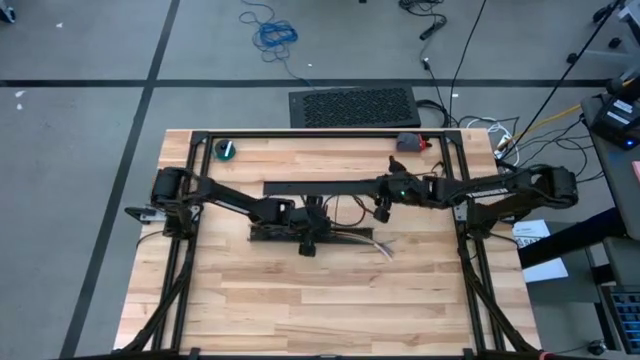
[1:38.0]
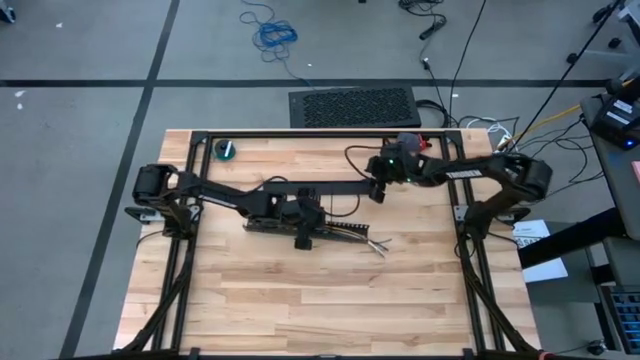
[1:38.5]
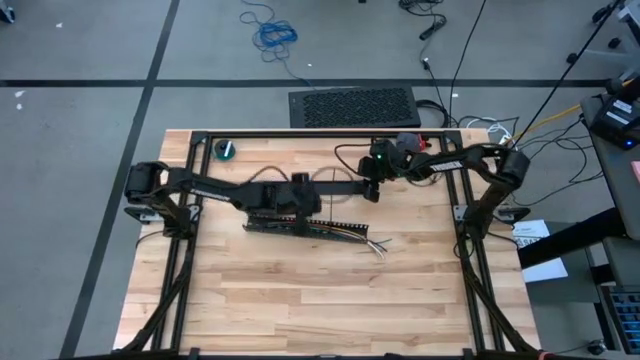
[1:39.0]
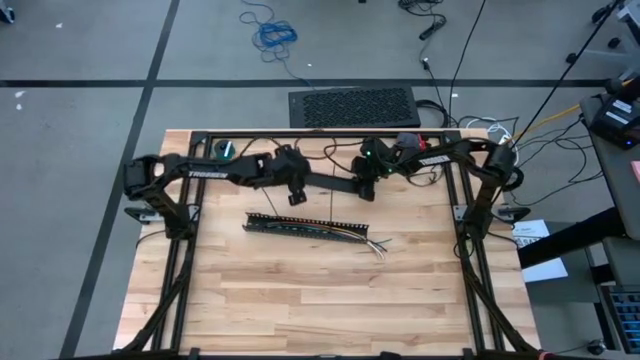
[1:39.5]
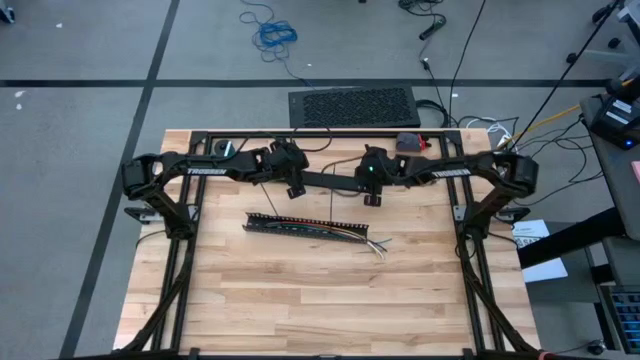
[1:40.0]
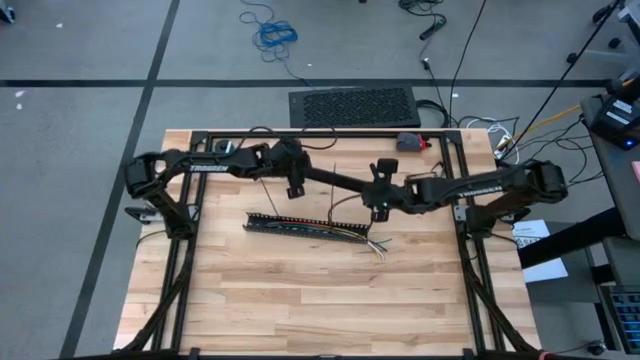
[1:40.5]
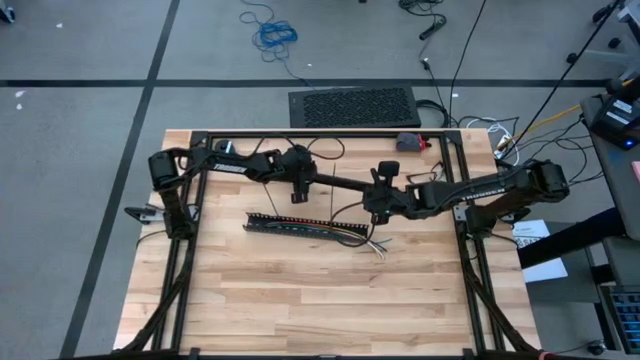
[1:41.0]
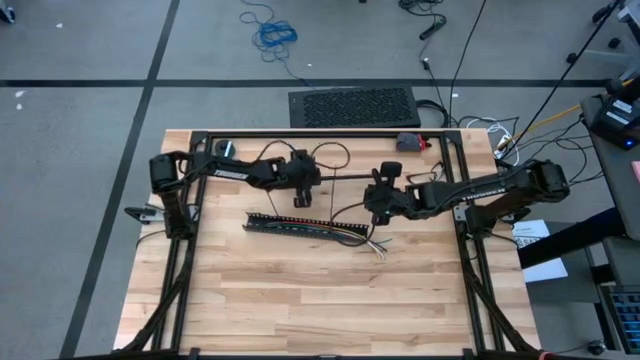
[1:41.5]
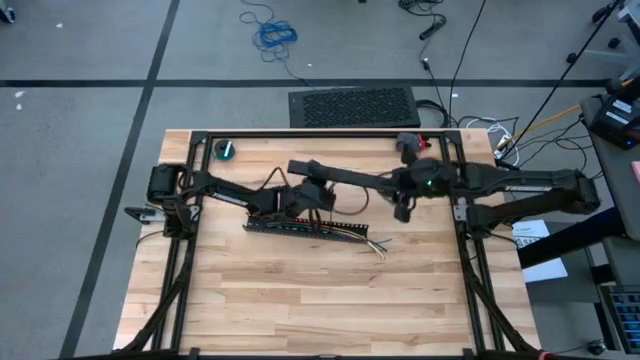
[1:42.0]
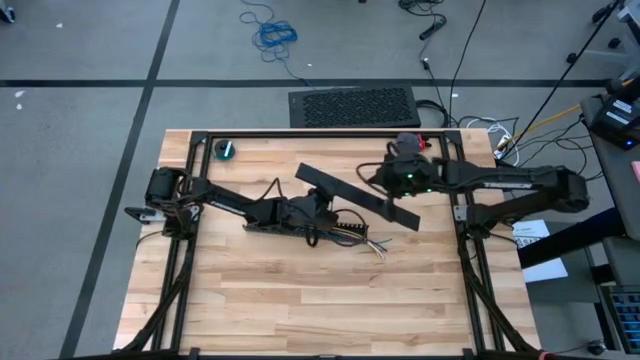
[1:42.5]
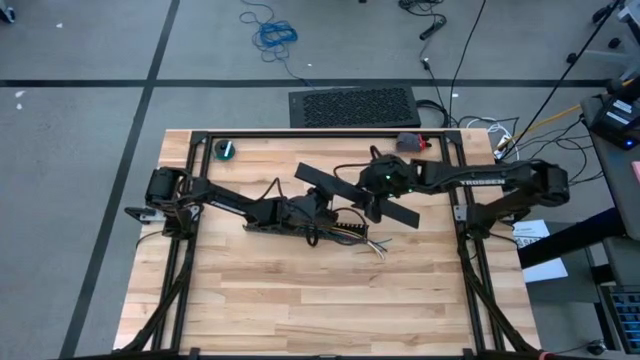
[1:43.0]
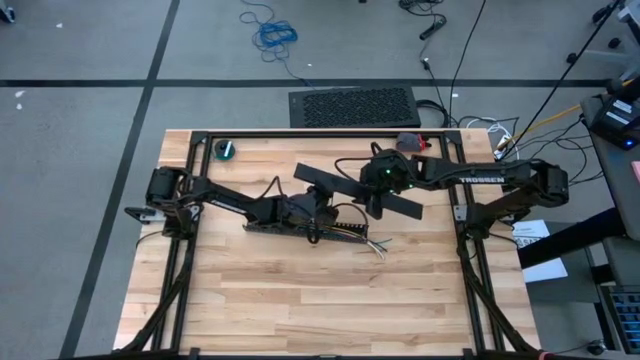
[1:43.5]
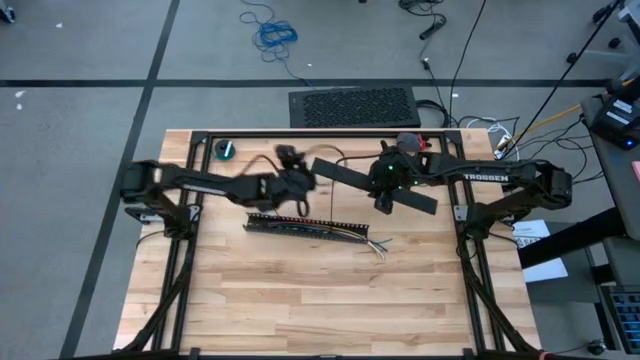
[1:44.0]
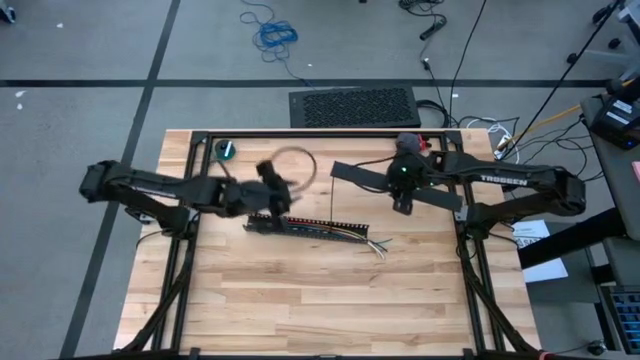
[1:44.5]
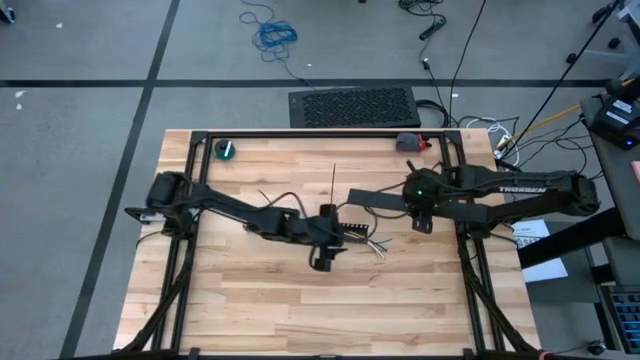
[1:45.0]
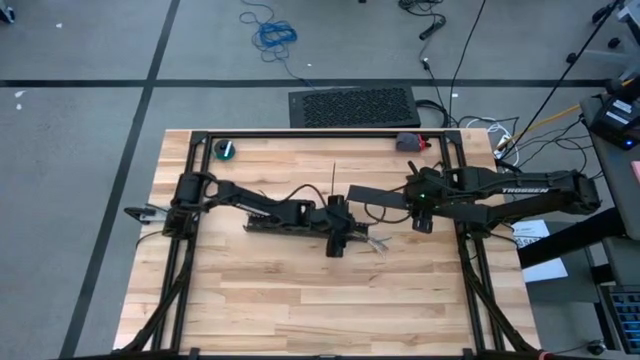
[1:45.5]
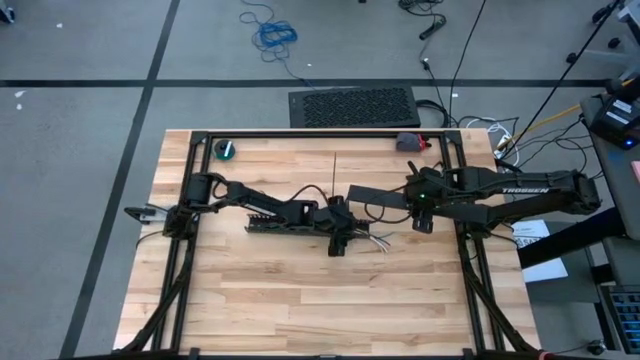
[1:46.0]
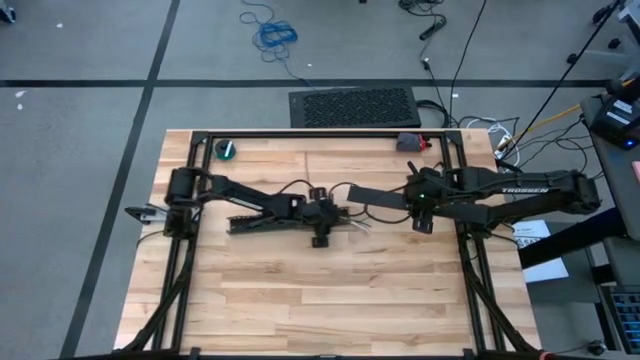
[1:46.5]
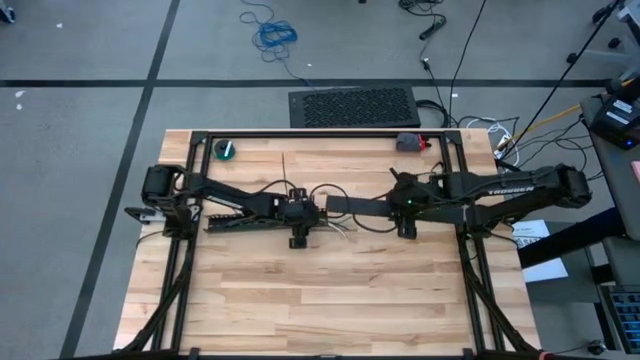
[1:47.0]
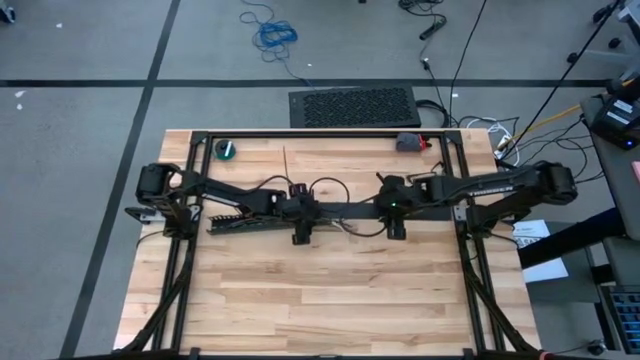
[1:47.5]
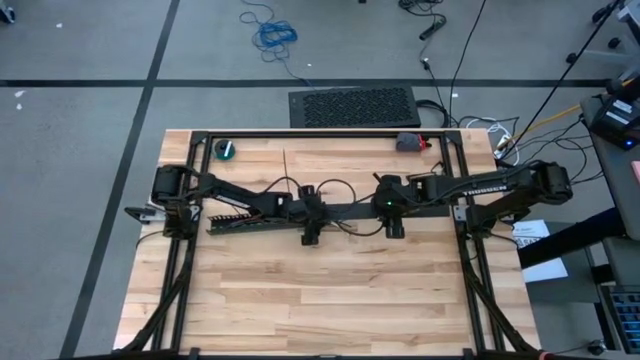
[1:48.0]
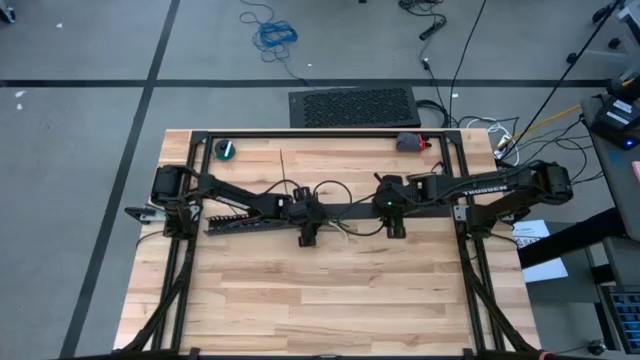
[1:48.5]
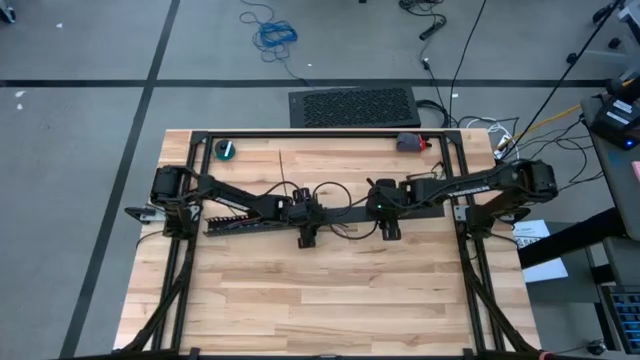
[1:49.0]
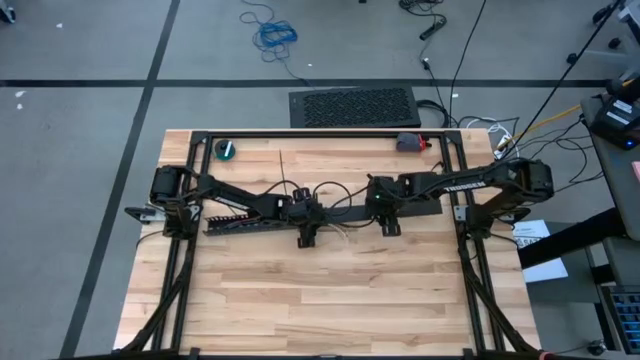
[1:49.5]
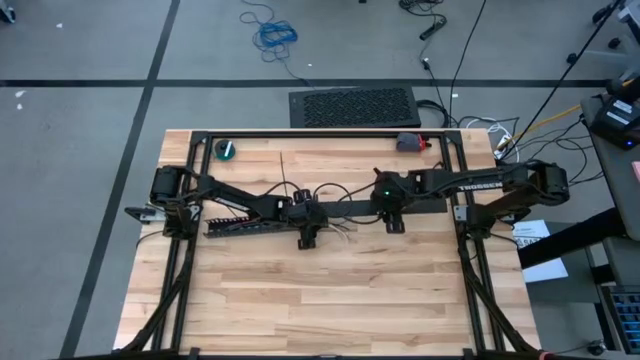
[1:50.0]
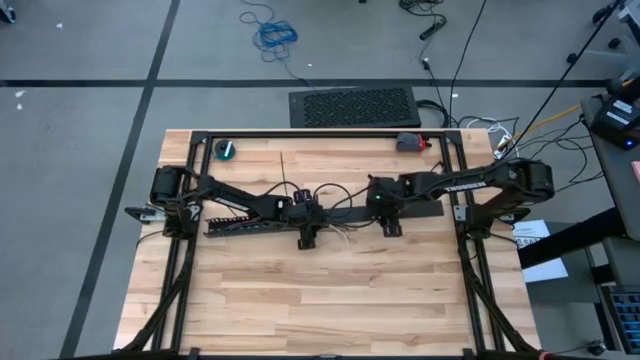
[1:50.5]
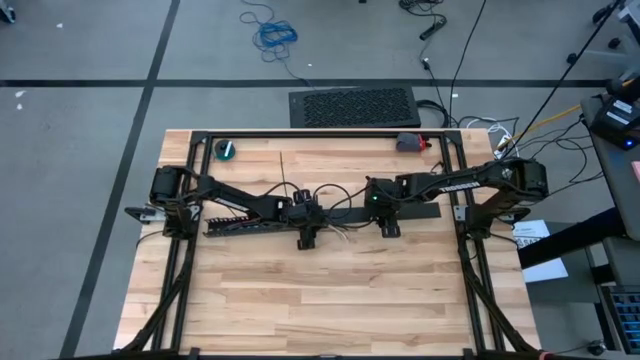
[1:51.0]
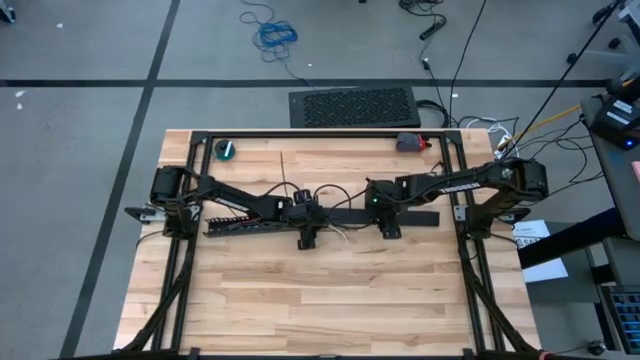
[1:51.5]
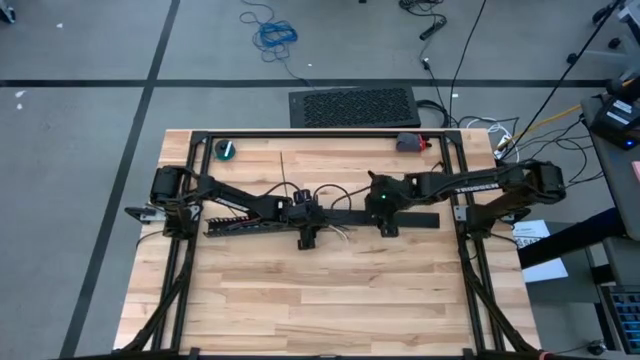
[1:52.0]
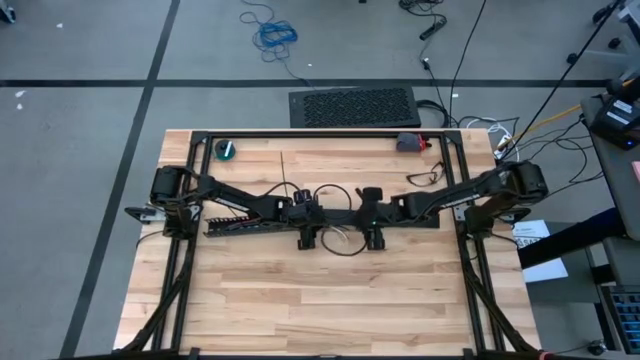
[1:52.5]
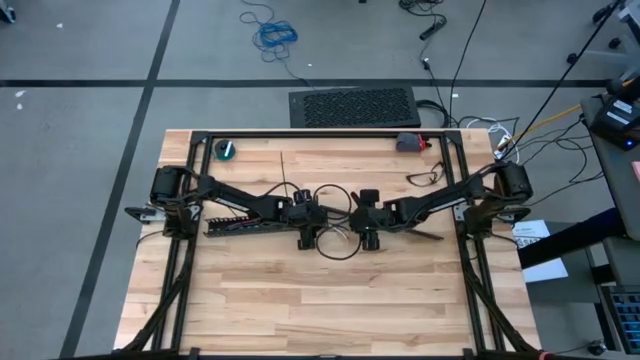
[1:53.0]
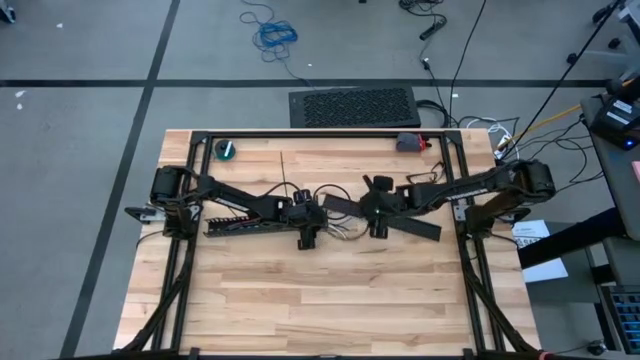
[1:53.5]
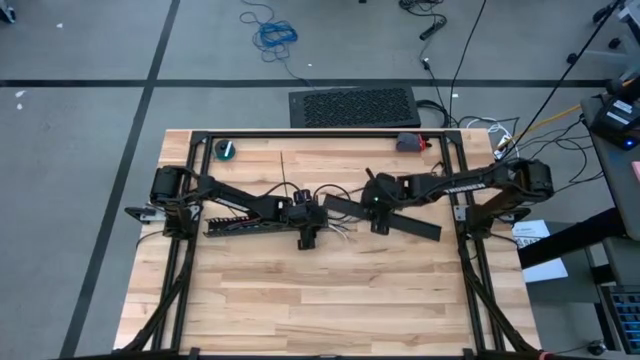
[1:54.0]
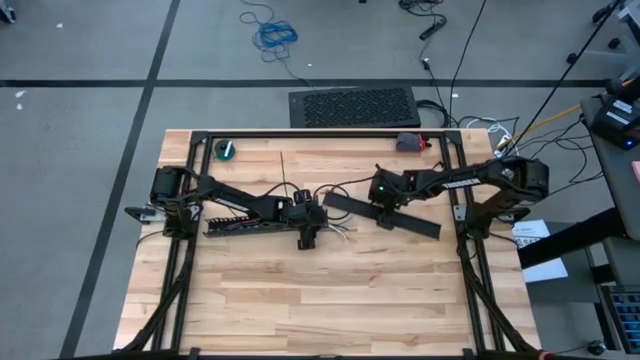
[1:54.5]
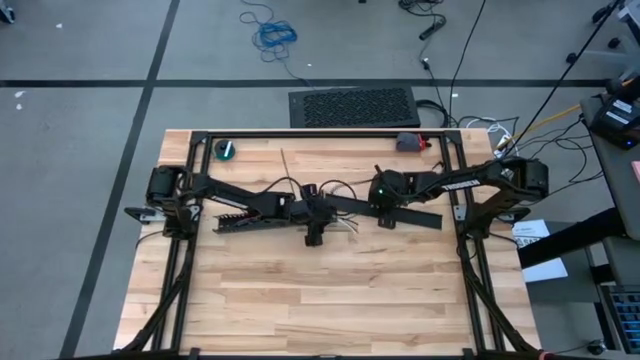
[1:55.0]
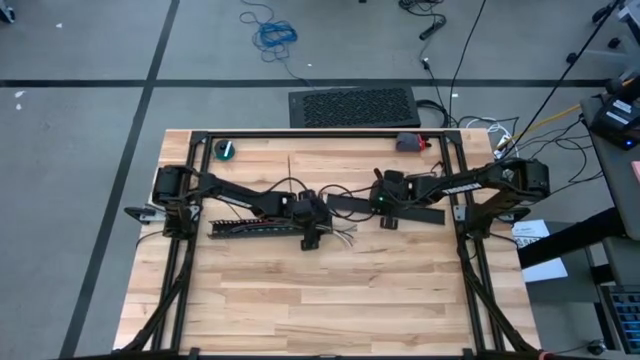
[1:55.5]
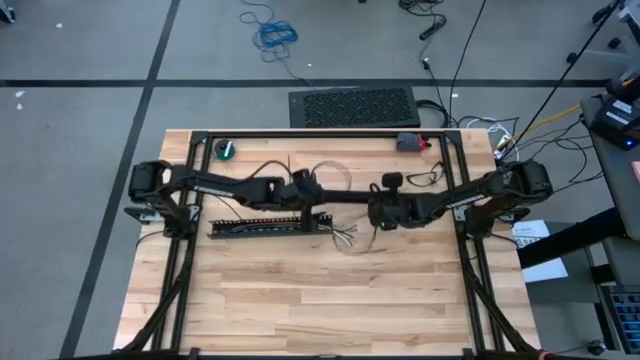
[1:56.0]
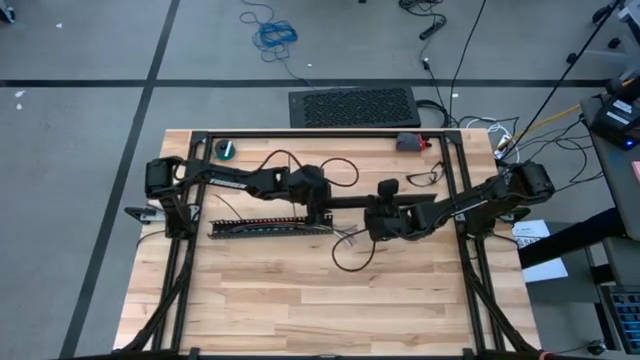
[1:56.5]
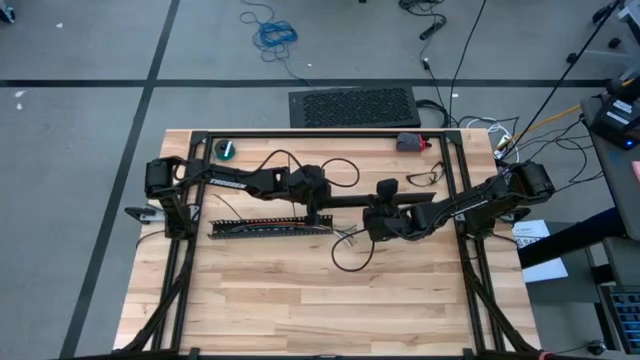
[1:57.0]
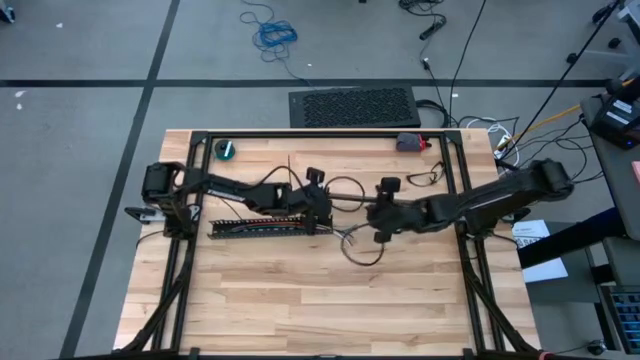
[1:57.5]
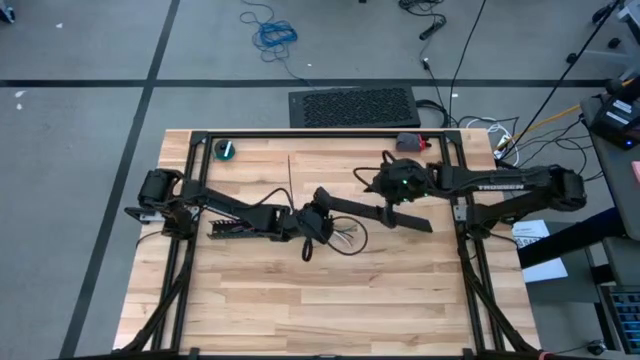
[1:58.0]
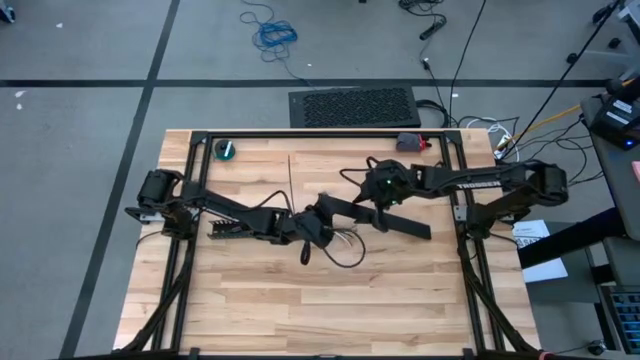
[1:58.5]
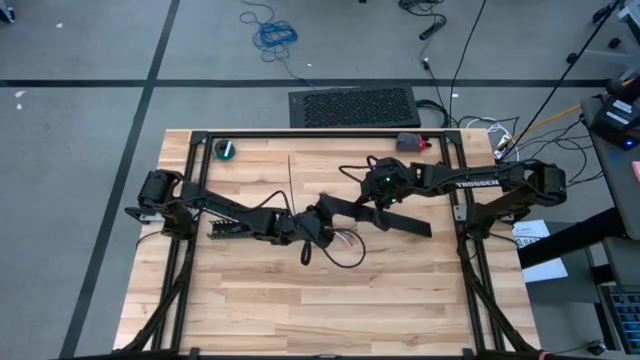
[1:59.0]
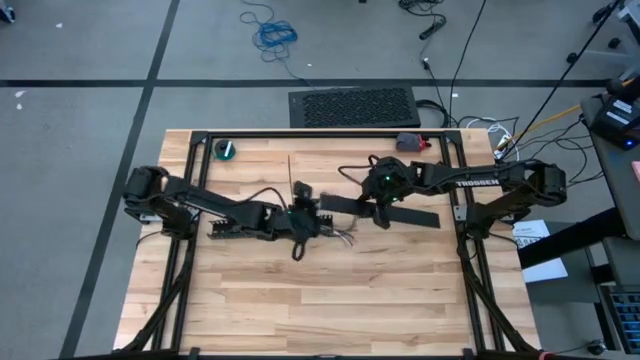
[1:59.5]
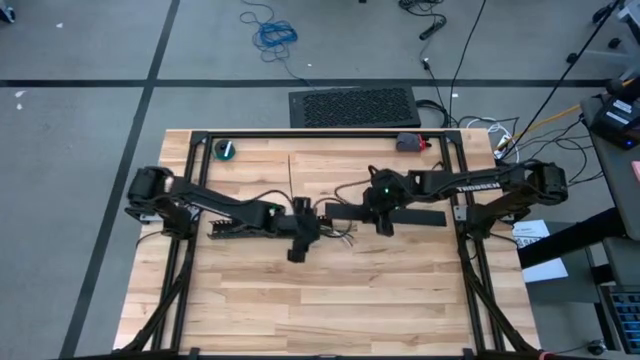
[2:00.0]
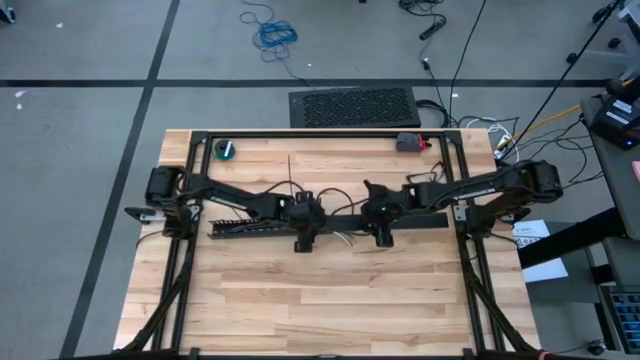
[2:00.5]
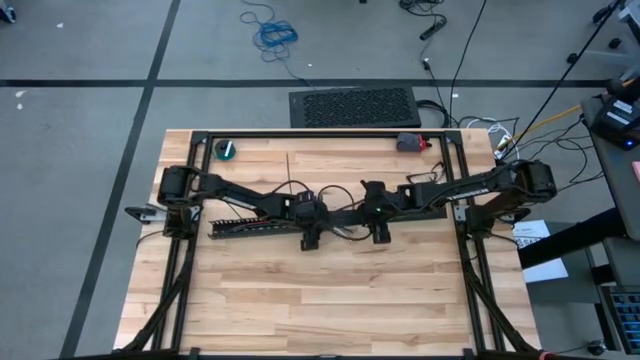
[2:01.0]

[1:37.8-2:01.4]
Task: Ziptie cables
Put the cable duct cover on
